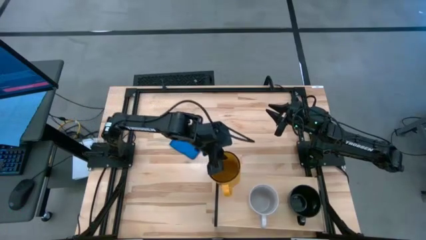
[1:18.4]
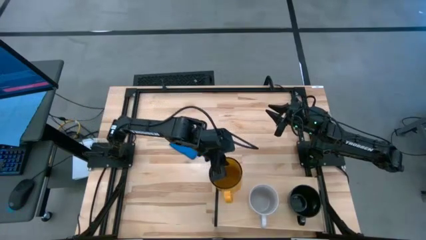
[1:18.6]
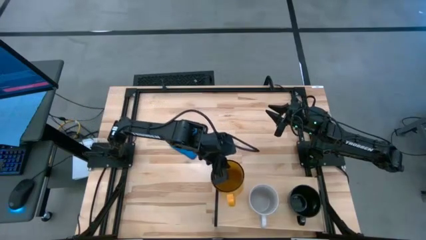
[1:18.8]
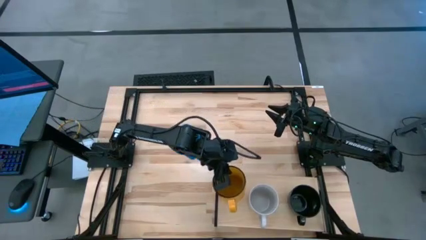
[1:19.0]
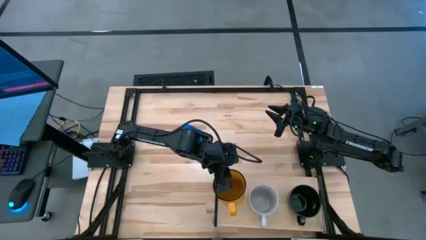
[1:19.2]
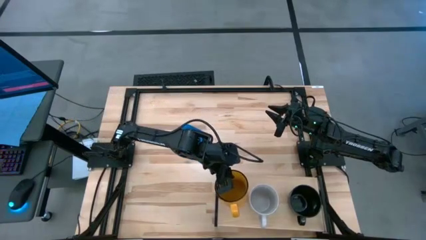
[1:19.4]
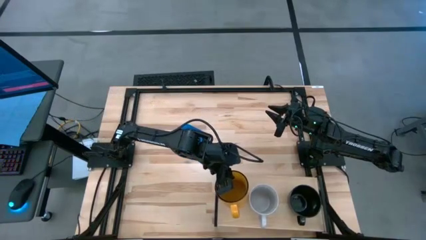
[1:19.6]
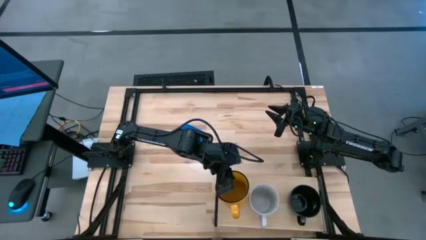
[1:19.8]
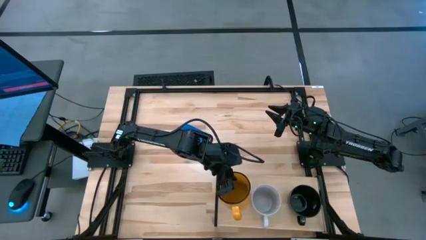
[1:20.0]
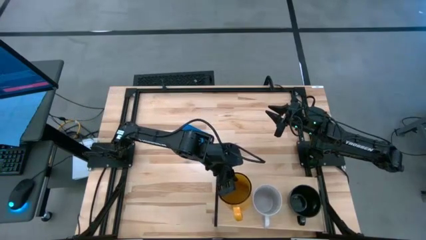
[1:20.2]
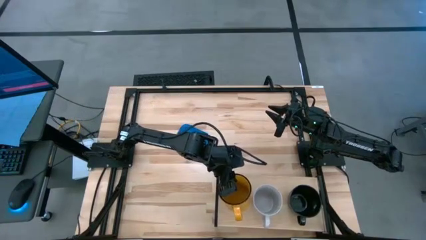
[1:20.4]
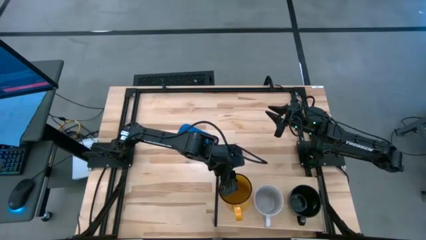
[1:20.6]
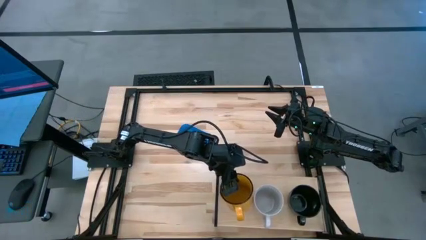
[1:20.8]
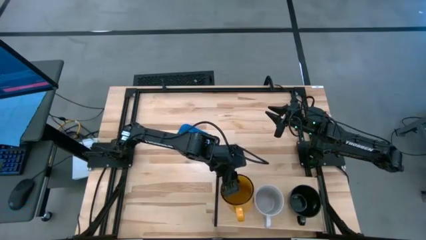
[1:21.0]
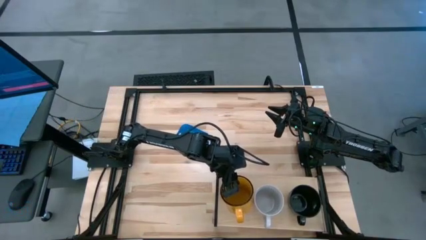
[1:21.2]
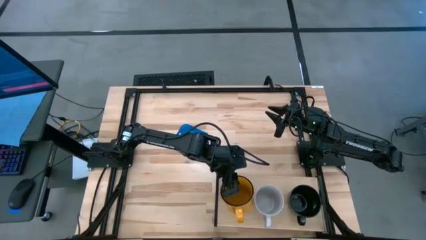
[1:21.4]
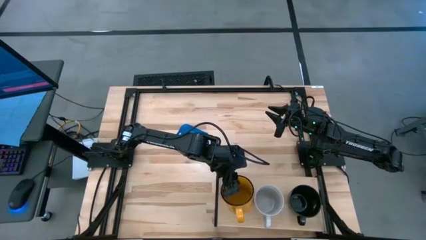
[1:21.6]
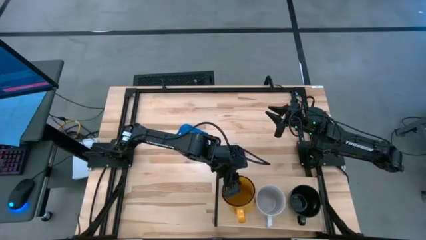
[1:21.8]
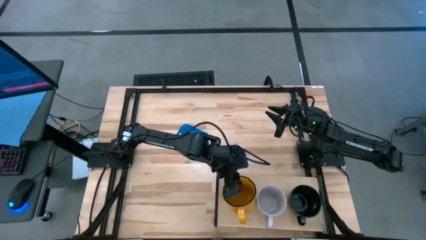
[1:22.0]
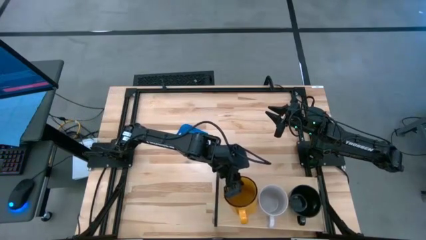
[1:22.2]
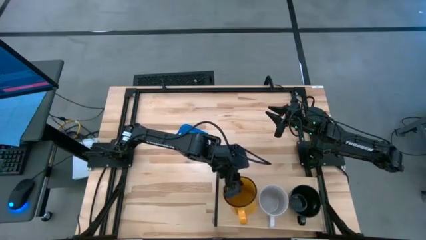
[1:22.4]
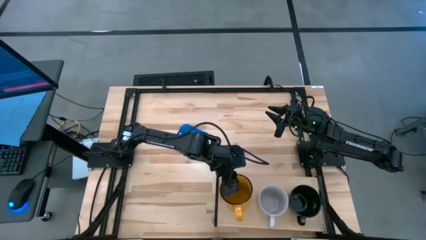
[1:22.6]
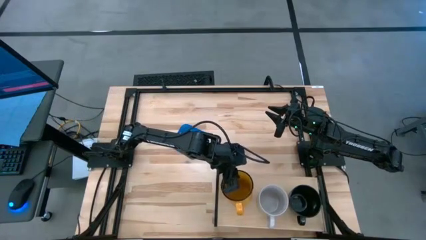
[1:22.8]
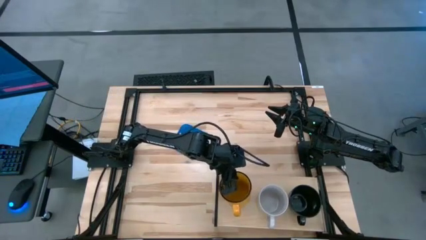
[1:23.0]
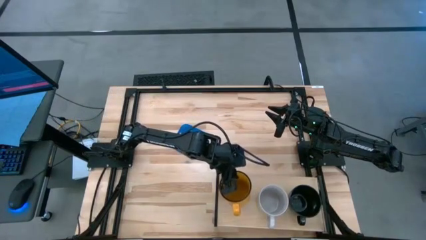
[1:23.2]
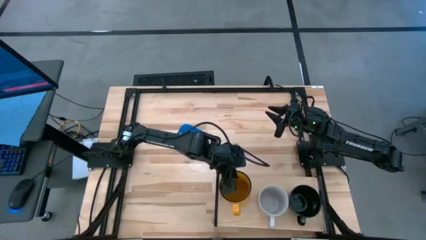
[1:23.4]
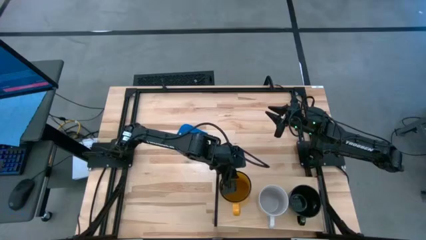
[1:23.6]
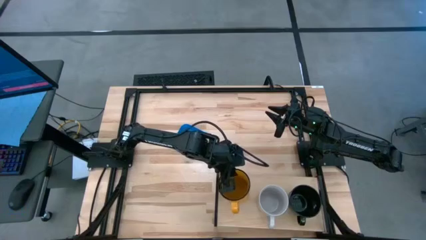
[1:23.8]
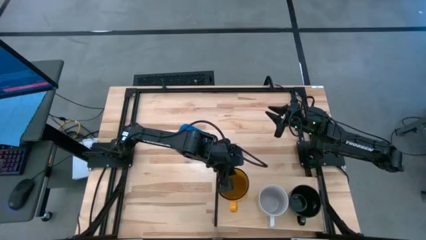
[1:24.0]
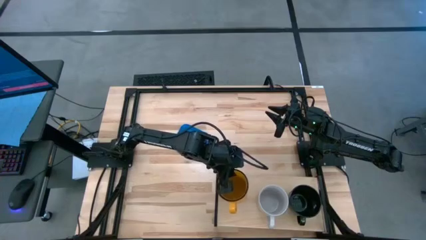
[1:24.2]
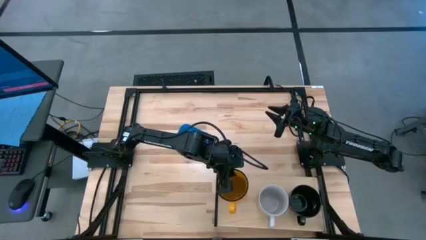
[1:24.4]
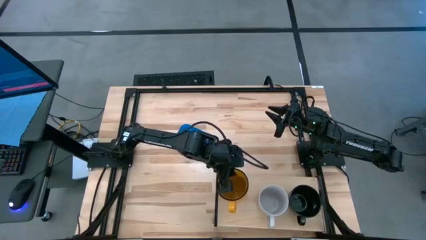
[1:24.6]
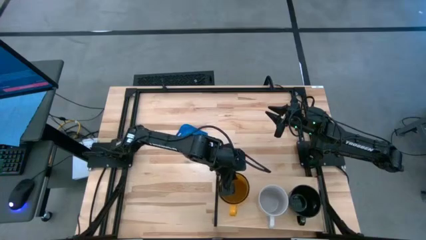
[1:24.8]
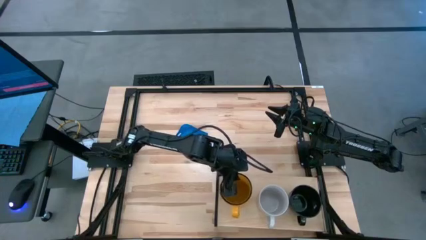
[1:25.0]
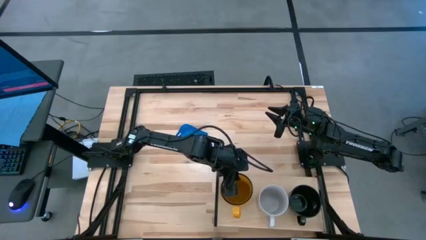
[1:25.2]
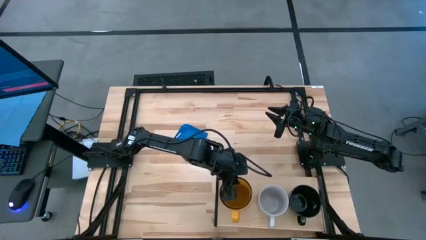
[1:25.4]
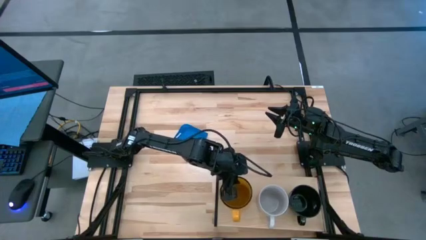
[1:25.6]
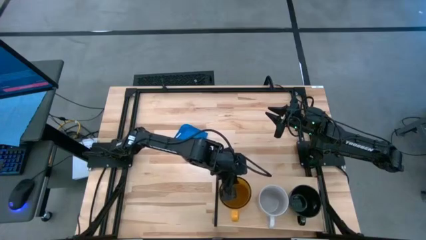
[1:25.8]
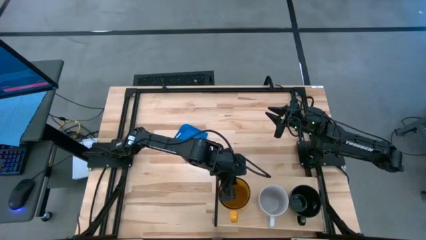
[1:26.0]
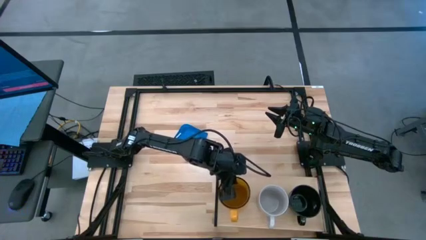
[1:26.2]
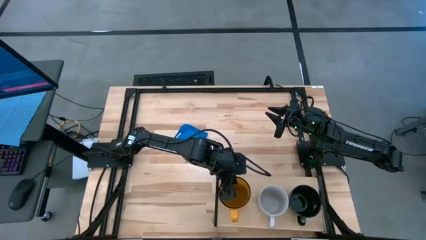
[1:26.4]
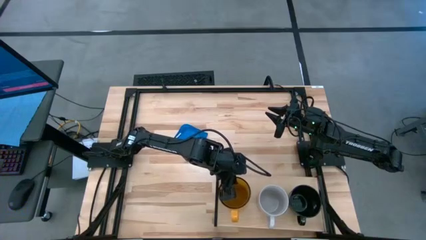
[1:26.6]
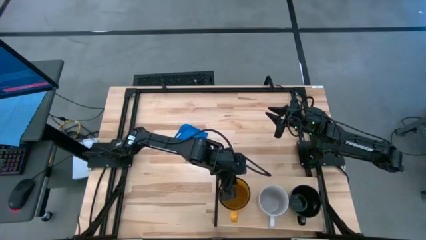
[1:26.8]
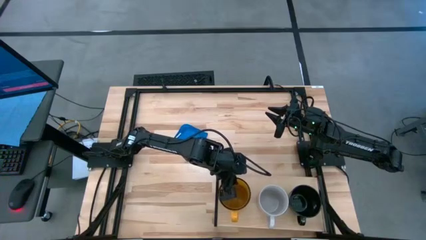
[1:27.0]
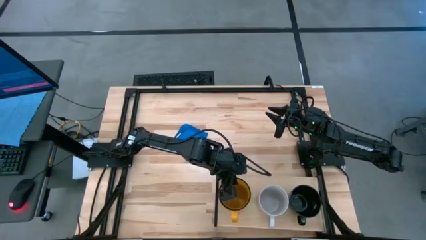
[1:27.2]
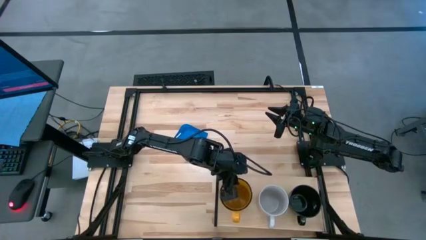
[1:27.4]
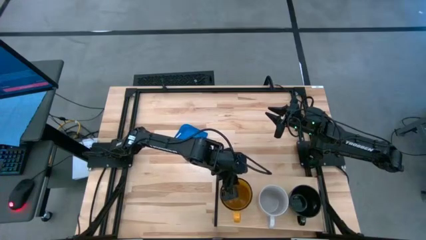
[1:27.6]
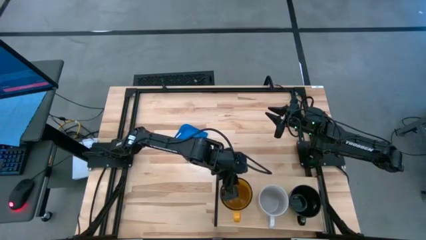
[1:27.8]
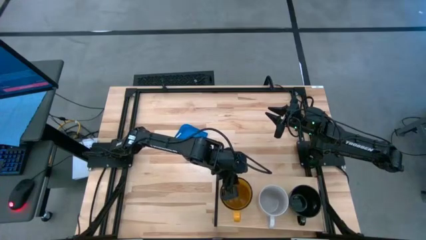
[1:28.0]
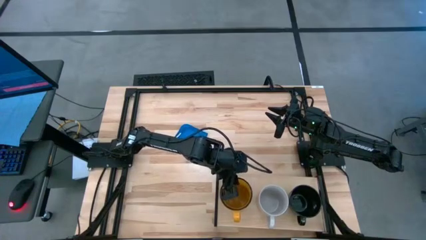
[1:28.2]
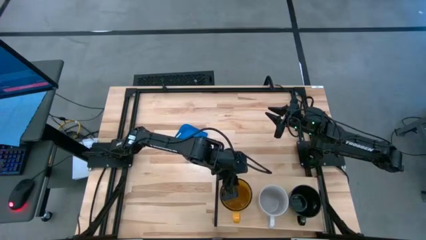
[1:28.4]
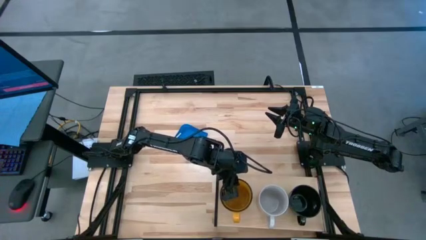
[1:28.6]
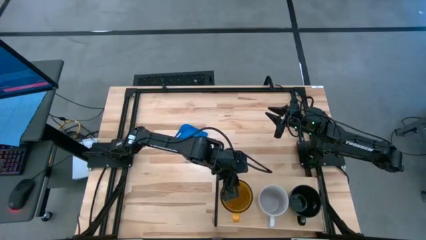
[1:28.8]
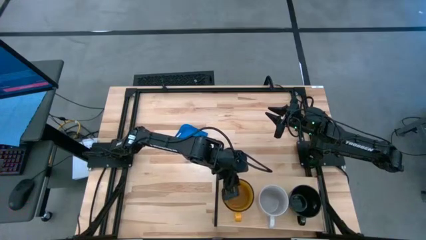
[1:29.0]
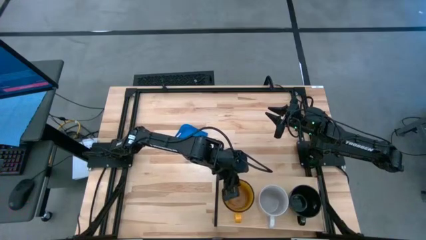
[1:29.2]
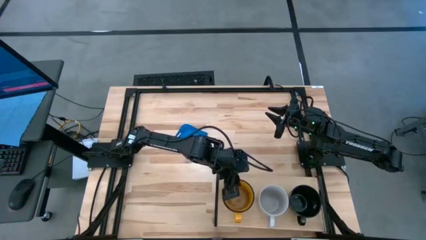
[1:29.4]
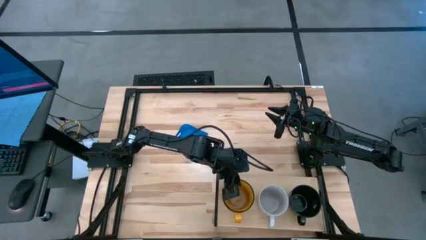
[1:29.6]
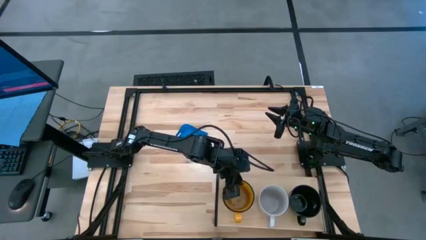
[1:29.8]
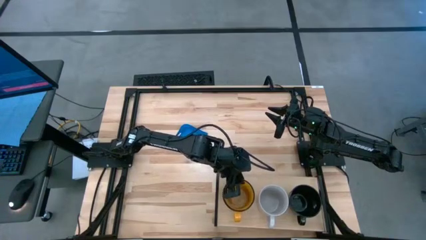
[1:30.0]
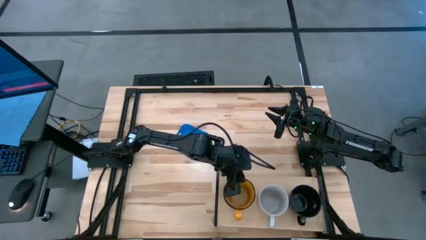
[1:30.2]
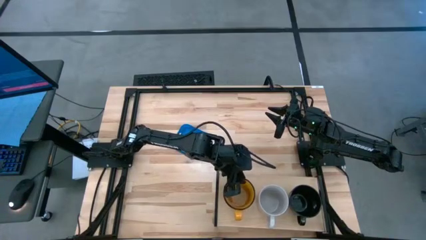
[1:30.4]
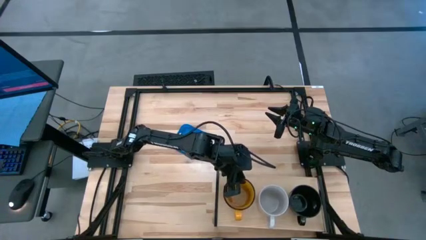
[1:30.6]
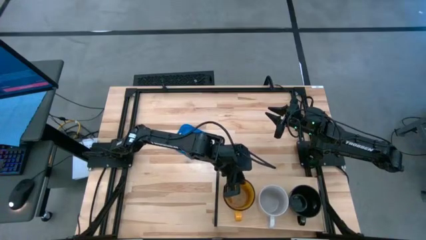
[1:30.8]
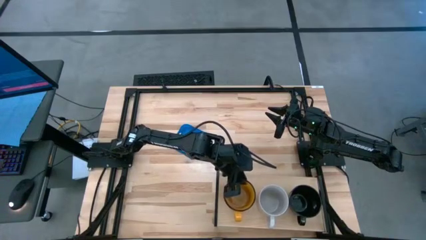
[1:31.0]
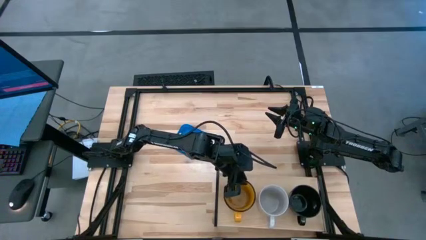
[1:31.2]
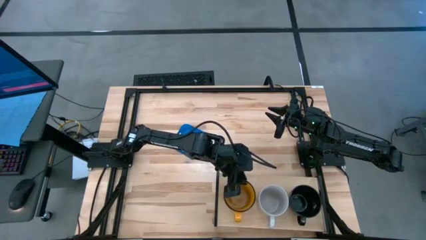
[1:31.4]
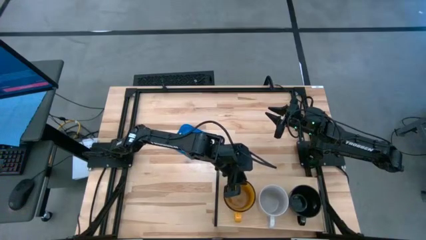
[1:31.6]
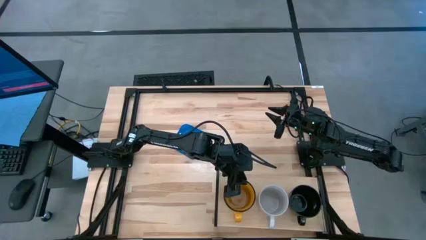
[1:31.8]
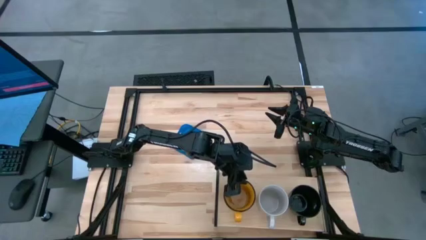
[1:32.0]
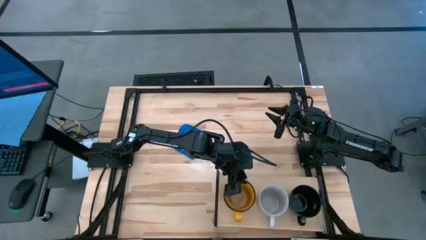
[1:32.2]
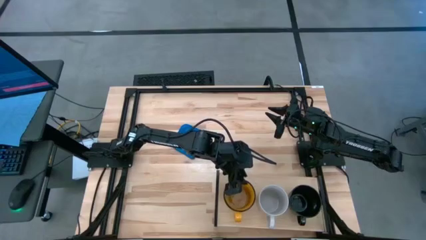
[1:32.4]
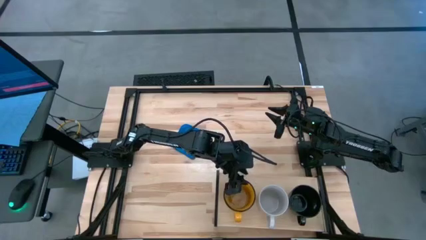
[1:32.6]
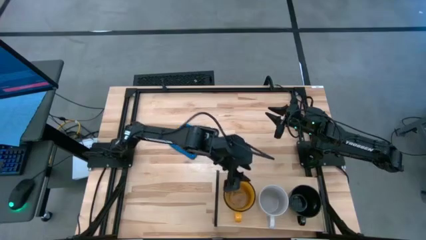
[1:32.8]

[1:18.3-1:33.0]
Task: Stack small to large cups/mugs on shelf
Put the yellow mug on the shelf
